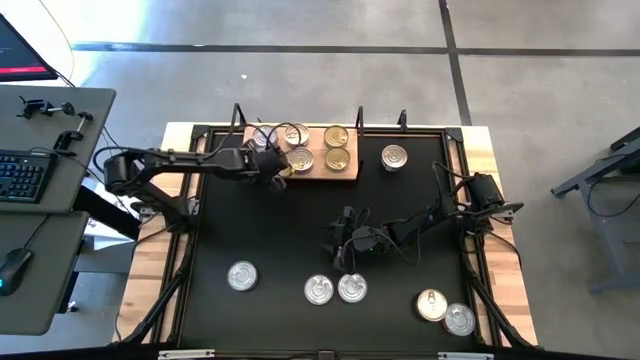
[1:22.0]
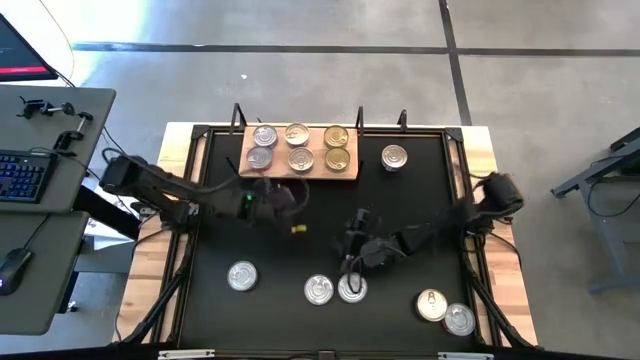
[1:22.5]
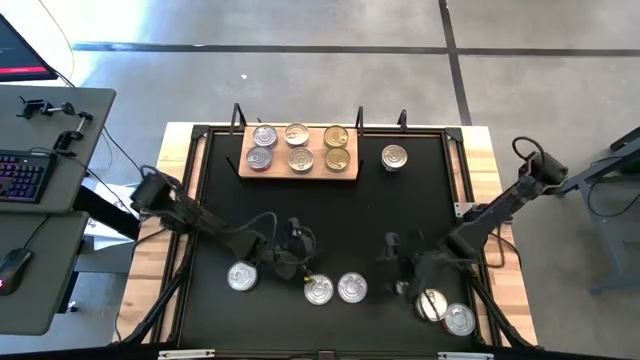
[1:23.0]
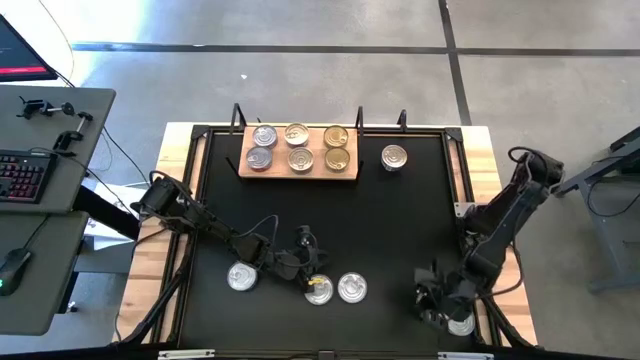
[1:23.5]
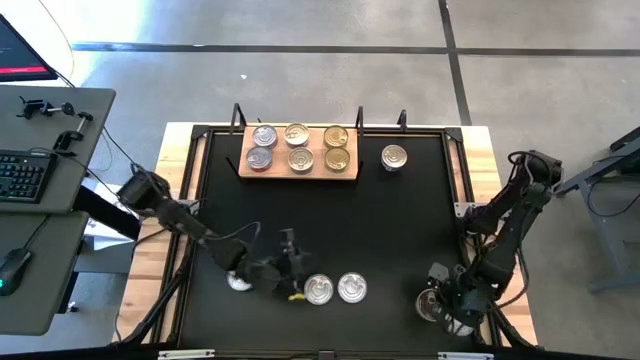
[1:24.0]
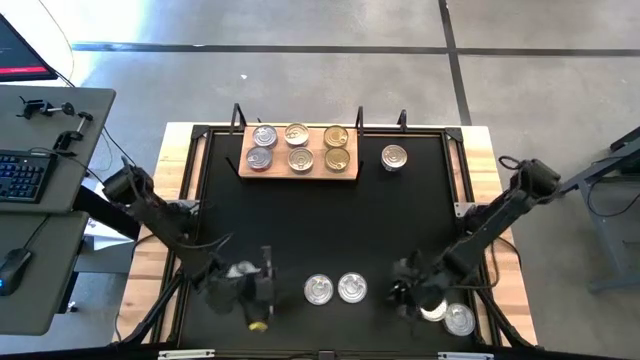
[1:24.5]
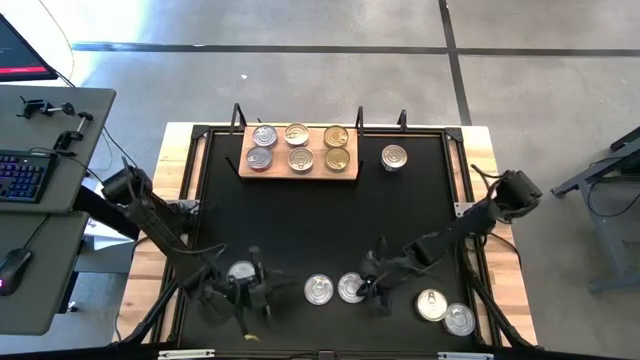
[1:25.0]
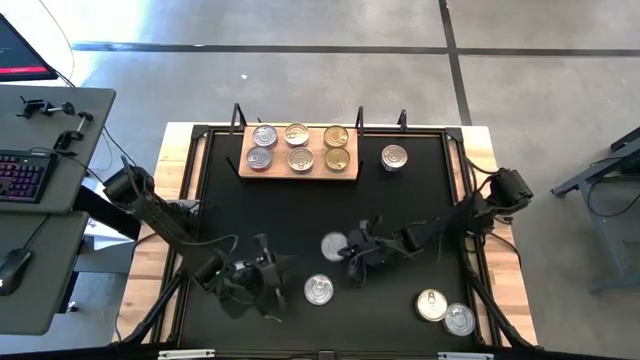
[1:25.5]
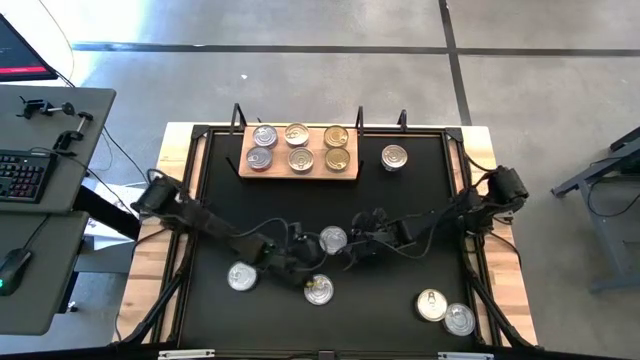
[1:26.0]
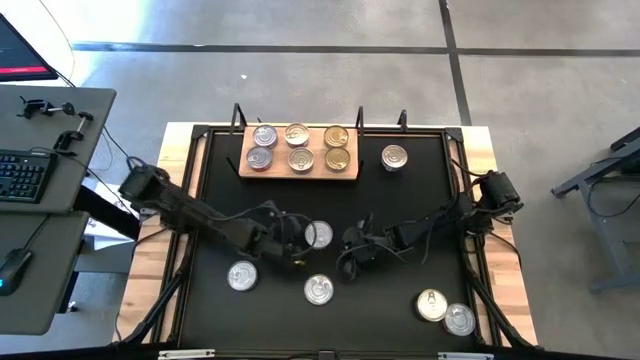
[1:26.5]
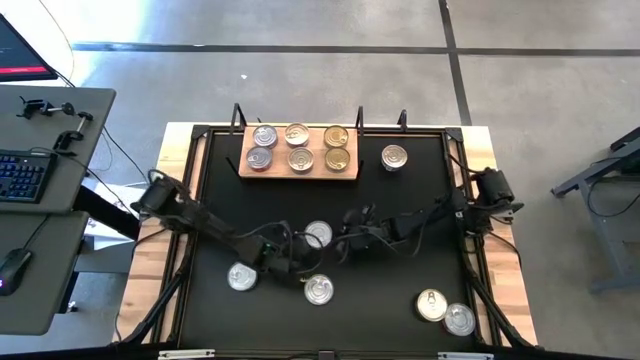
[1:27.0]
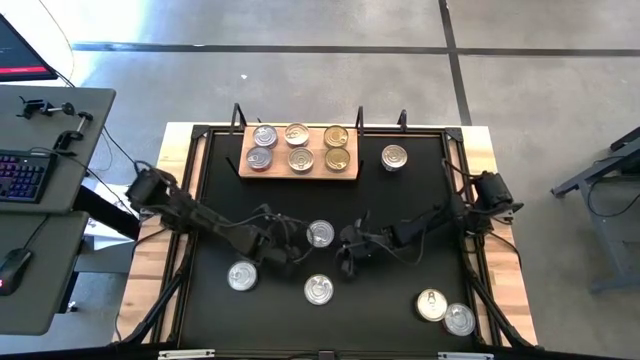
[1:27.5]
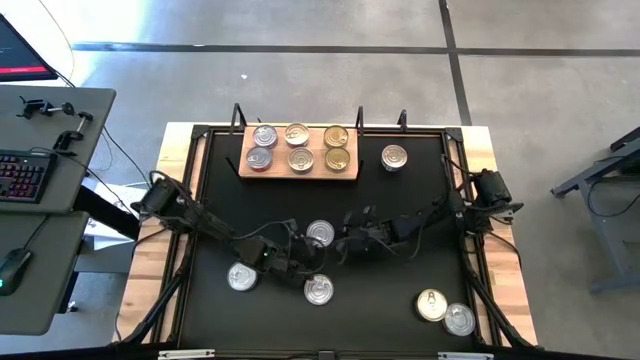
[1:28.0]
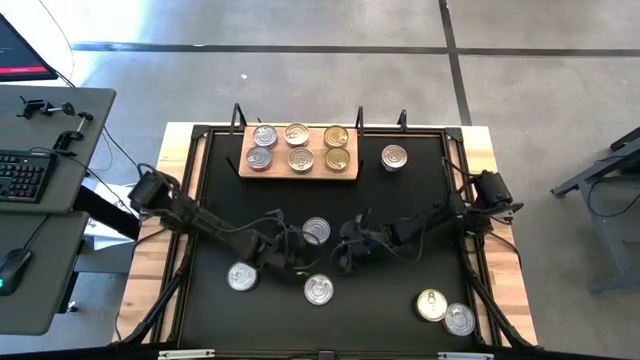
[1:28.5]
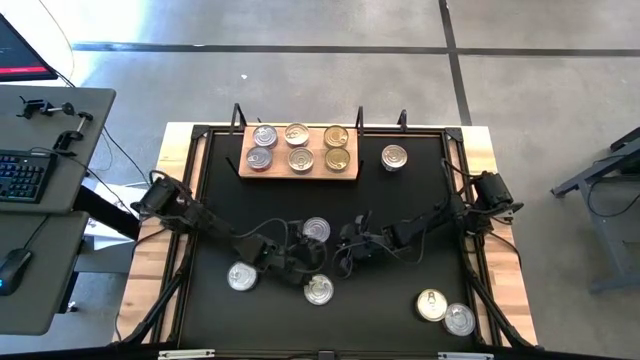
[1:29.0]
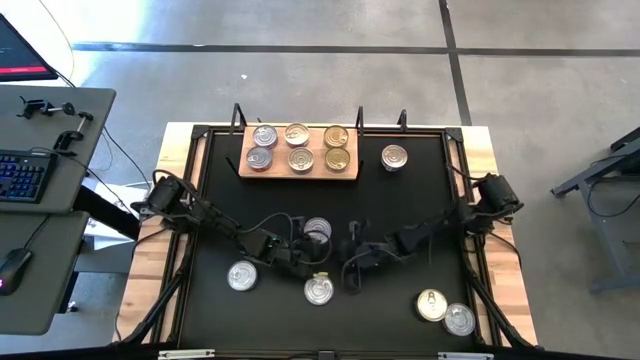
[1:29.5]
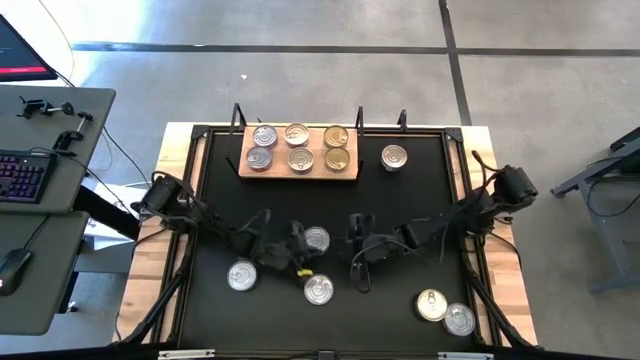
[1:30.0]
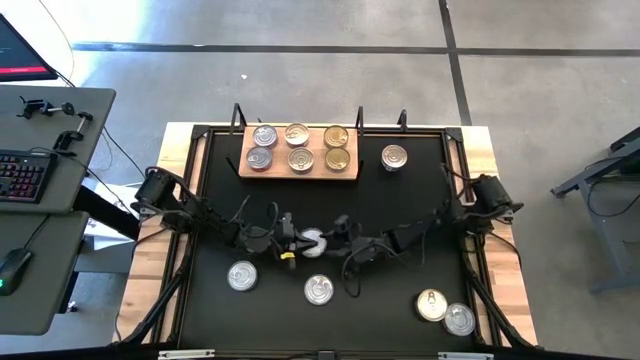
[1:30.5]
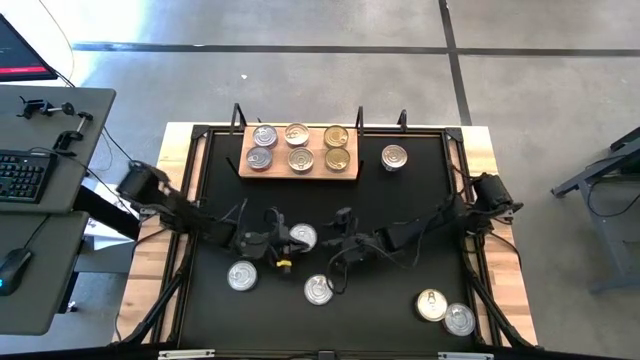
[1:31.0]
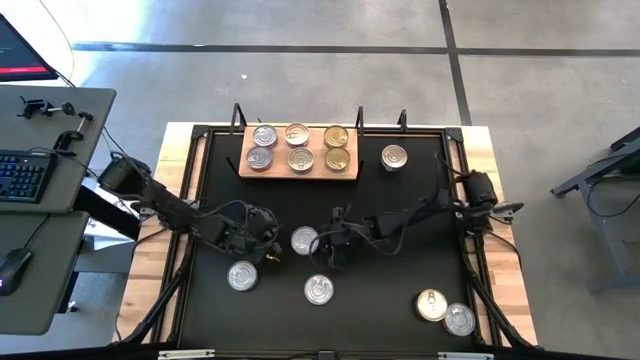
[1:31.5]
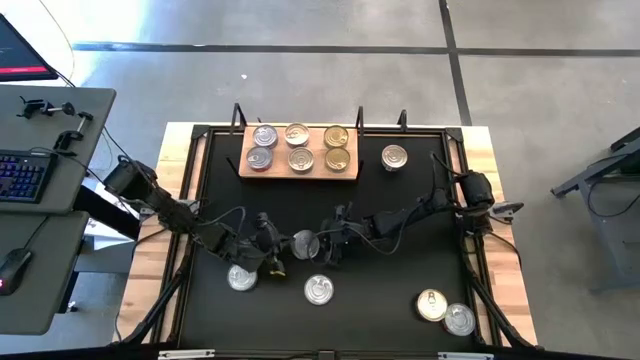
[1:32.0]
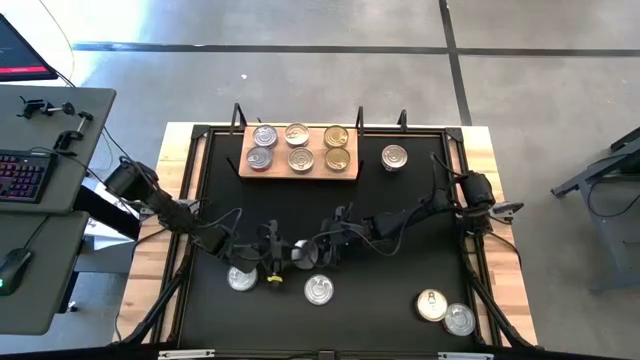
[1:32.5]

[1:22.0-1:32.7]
Task: Stack canned seafood by type on shelf
Stack the green tuna can on top of the green tuna can on the shelf

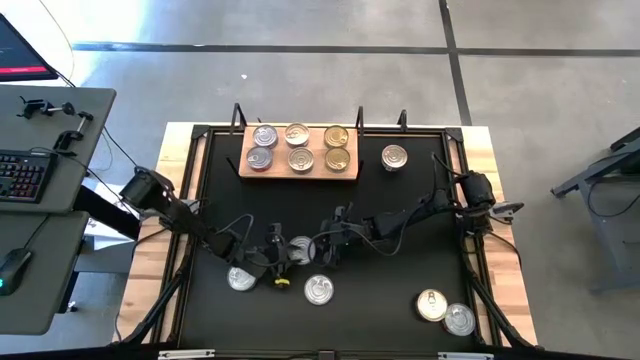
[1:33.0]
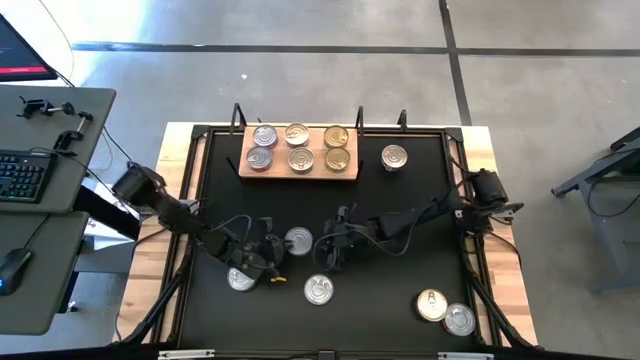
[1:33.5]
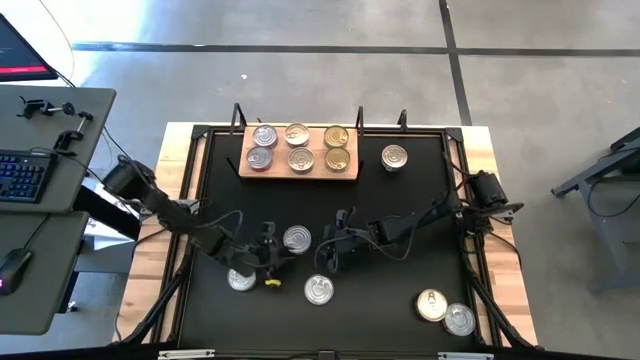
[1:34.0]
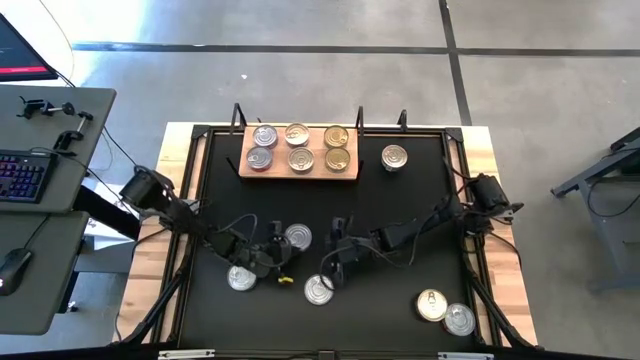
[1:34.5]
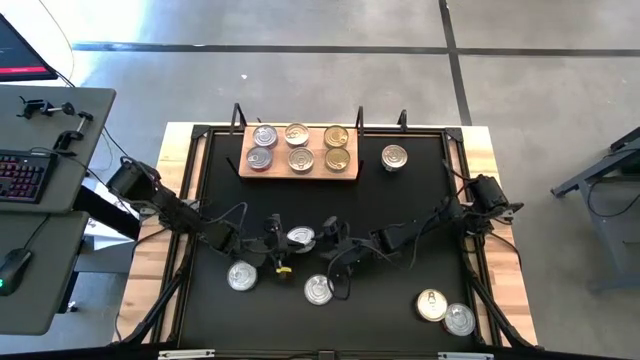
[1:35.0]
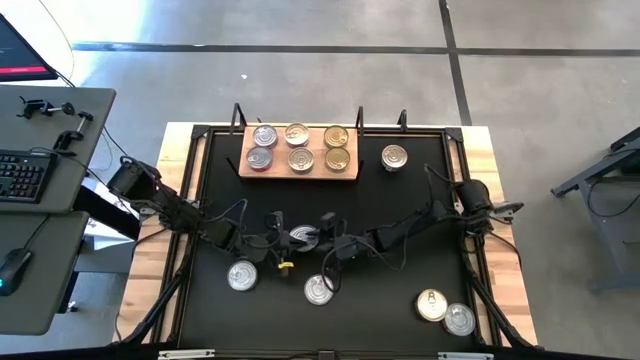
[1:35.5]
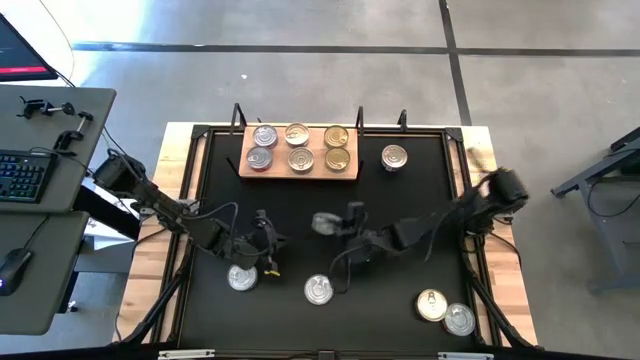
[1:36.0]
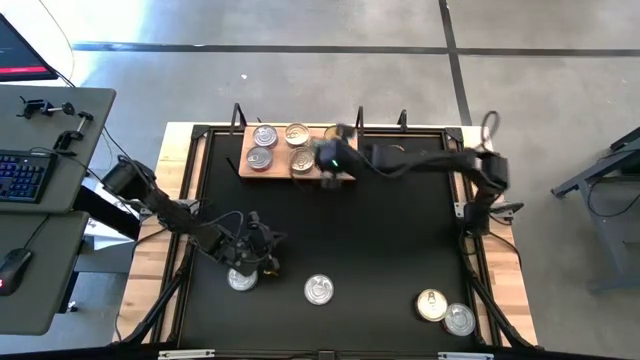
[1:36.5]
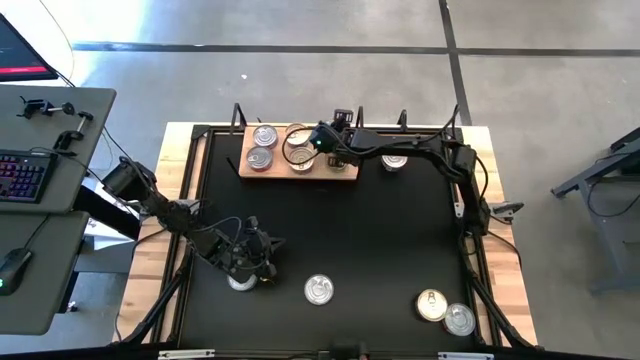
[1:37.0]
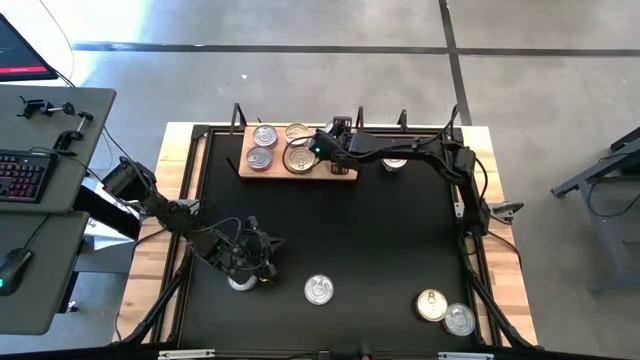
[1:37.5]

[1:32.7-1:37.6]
Stack the green tuna can on top of the green tuna can on the shelf

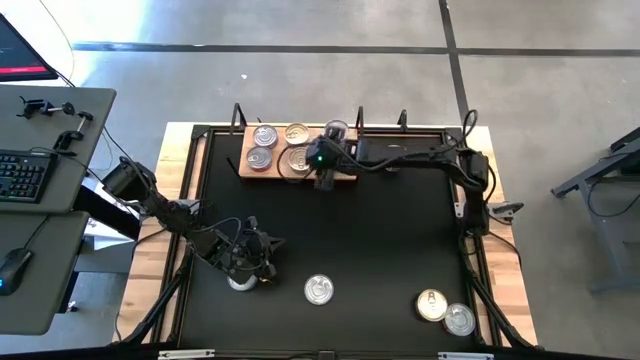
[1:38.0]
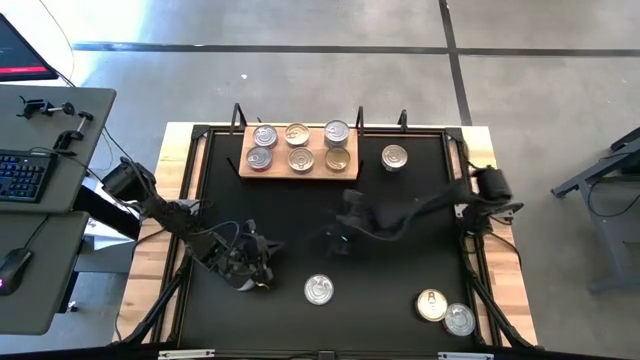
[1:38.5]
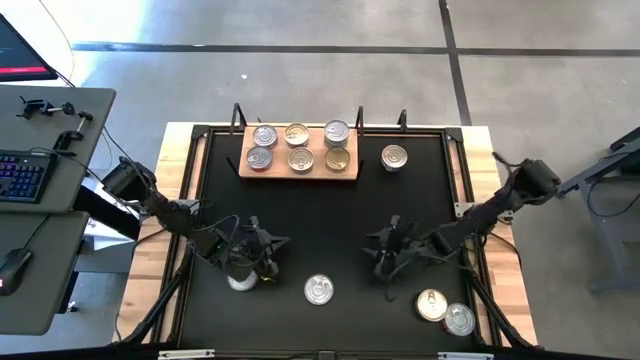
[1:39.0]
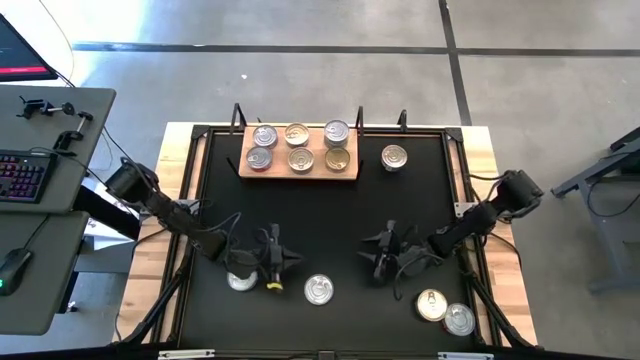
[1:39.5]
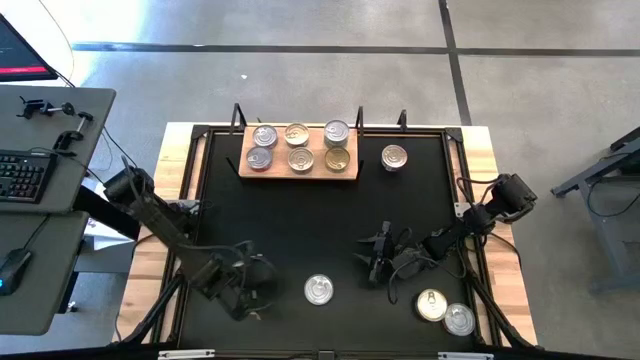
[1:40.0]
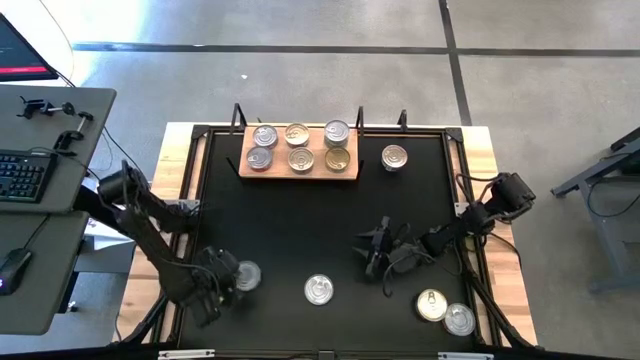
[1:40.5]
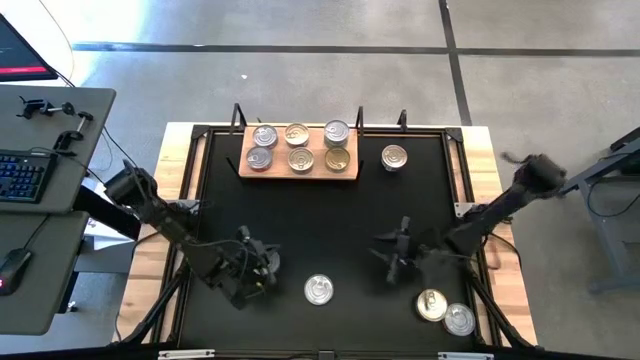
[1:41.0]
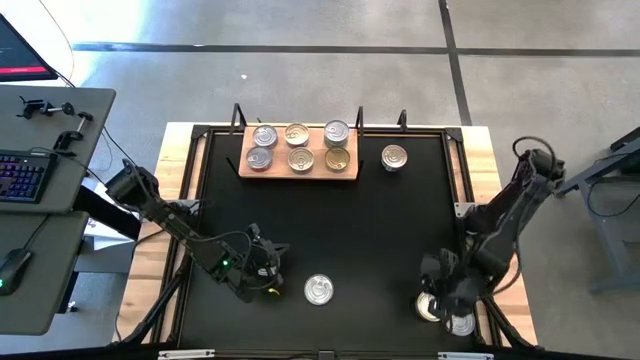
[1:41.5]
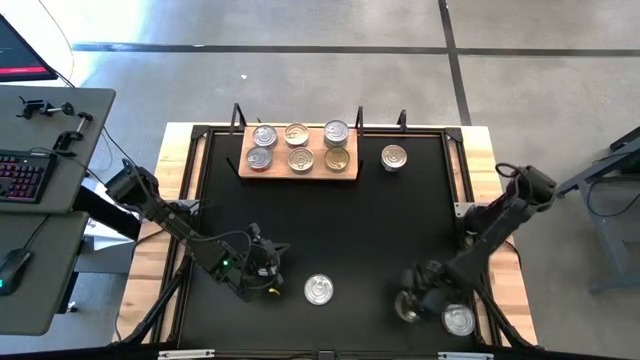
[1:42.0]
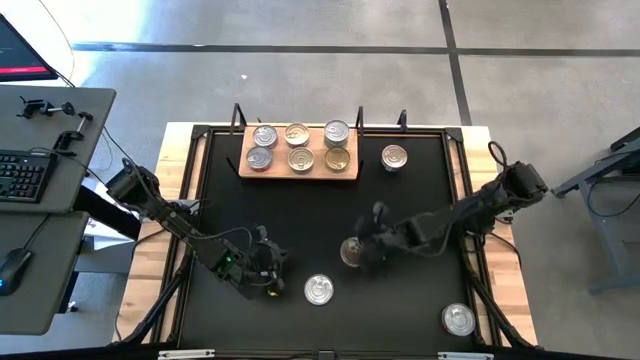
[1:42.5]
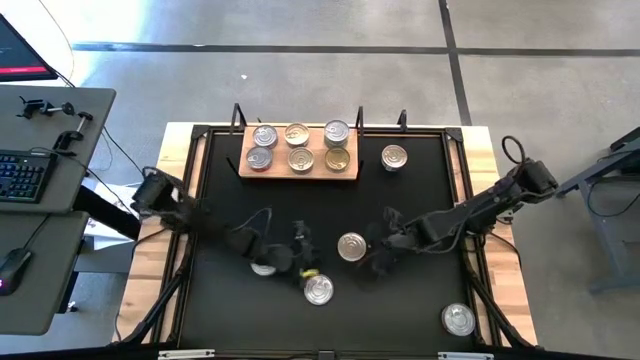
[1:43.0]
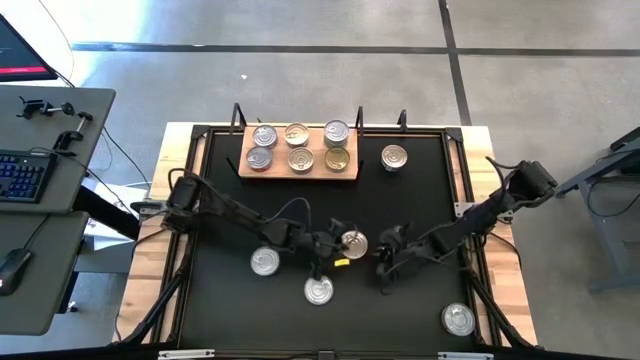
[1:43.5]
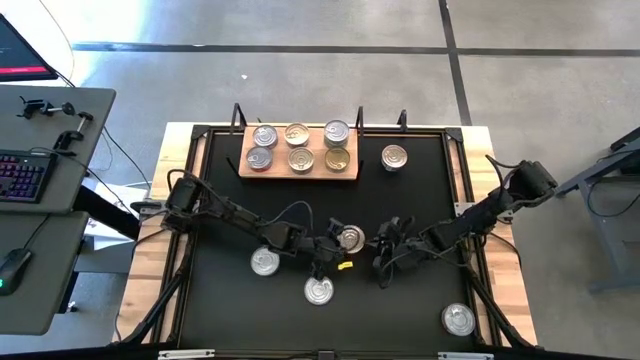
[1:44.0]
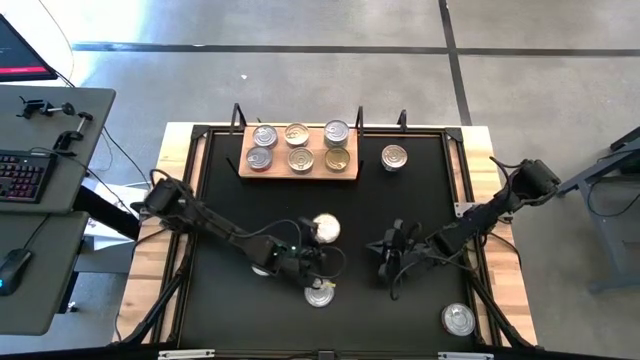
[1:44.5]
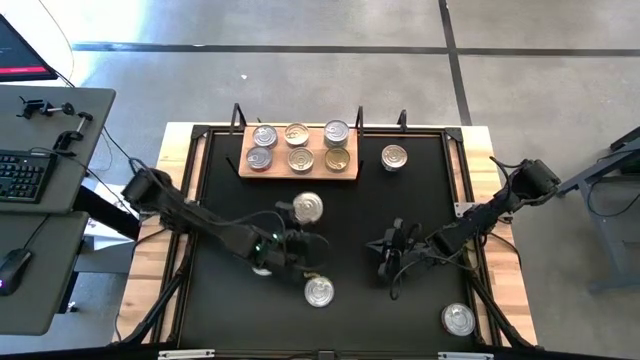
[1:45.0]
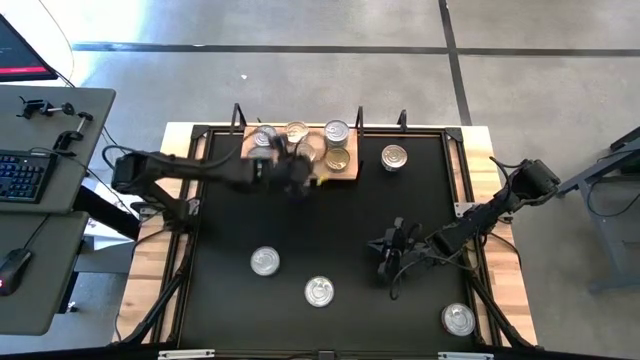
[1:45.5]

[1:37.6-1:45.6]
Stack the blue and pink tuna can on top of the blue and pink tuna can on the shelf
